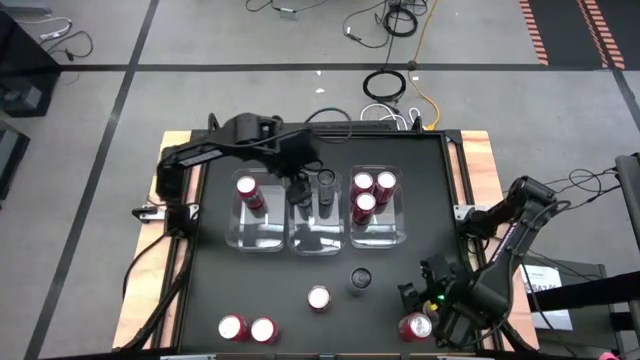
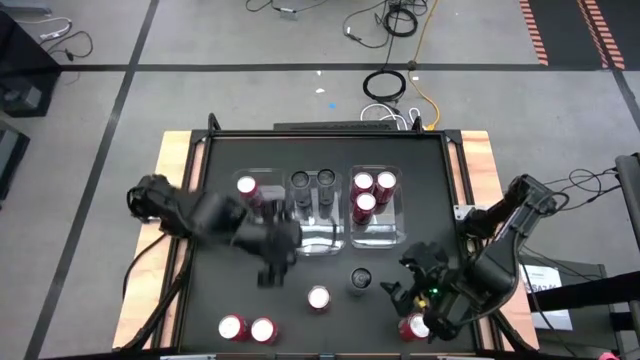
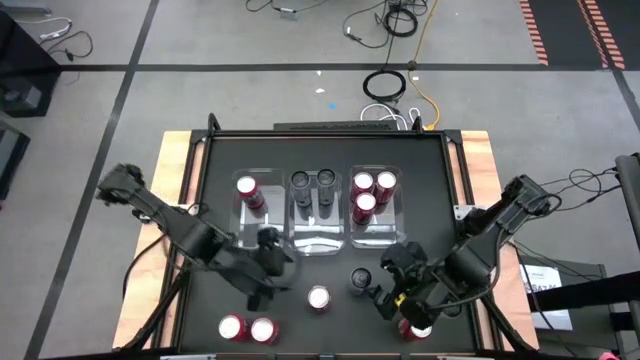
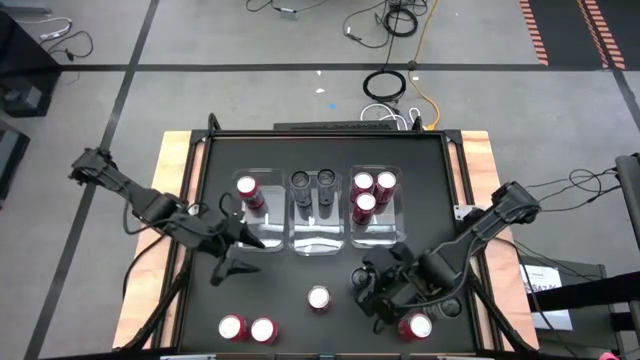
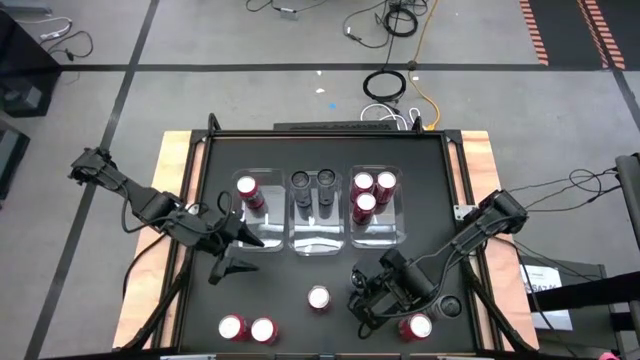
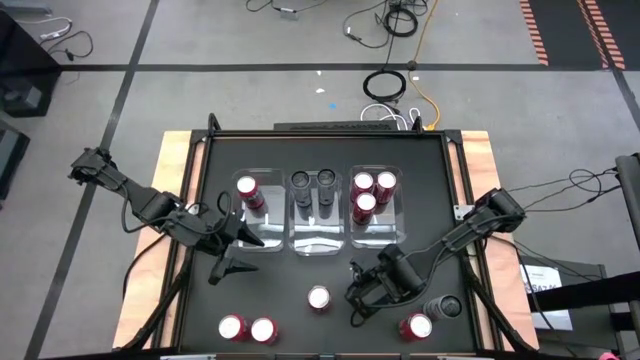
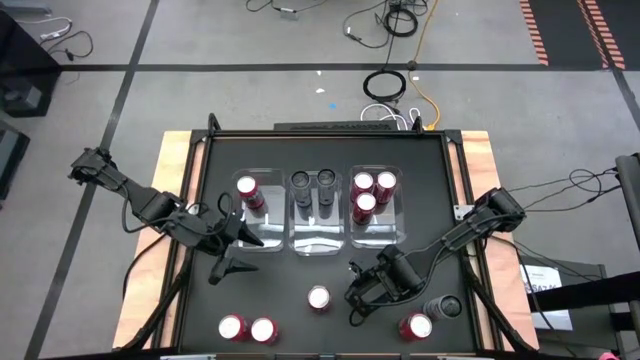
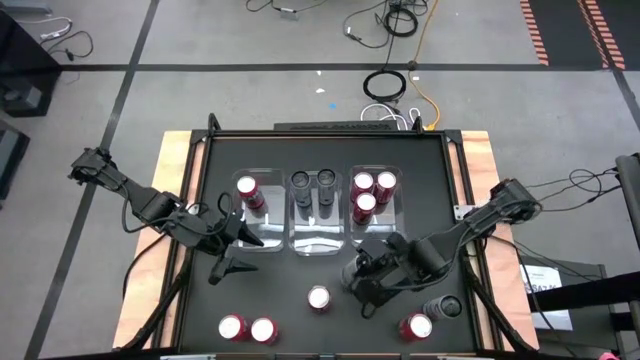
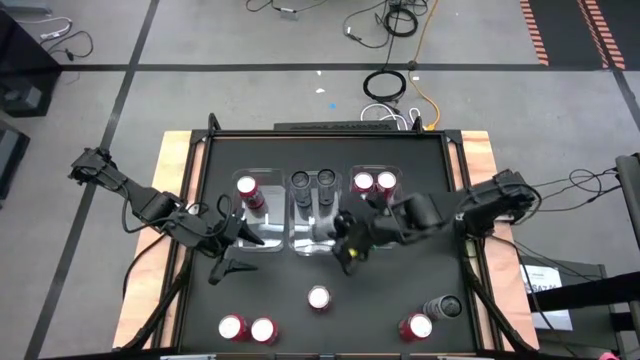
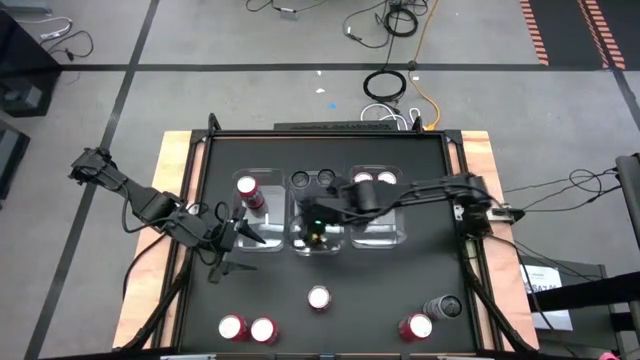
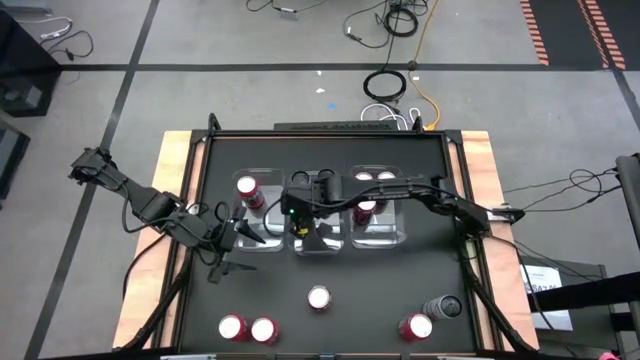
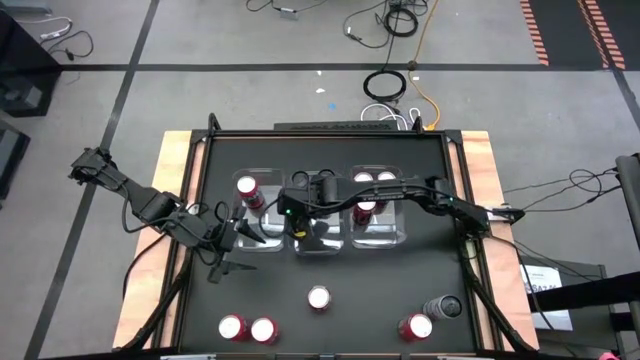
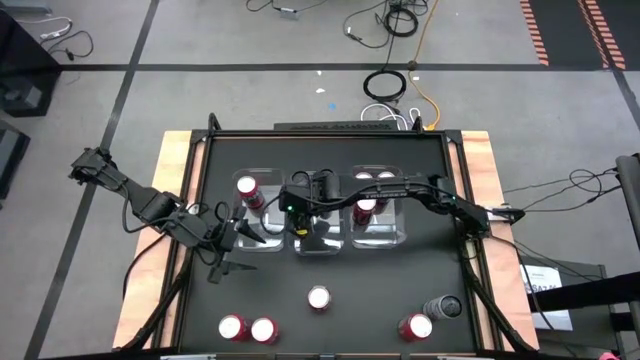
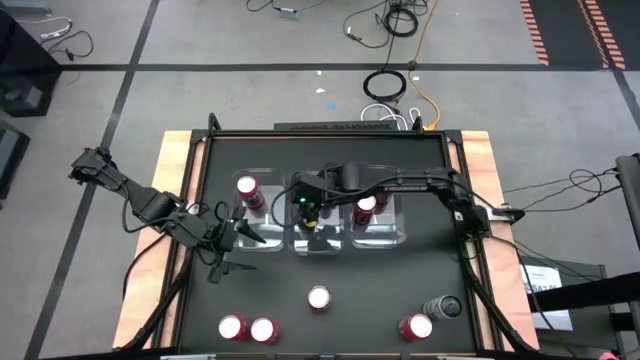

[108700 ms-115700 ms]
Task: Sort soda cans
Put the left white soda can into the middle transparent bin

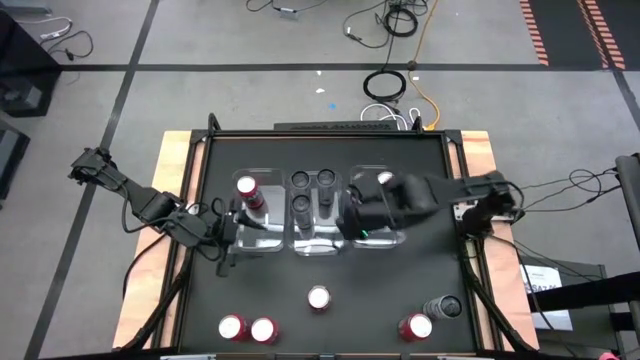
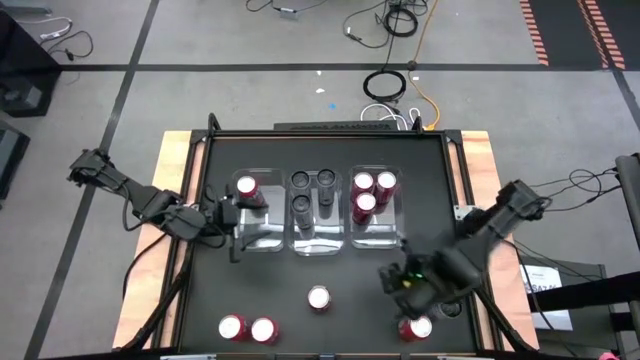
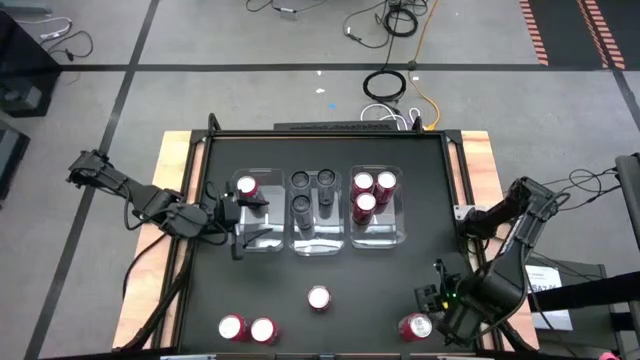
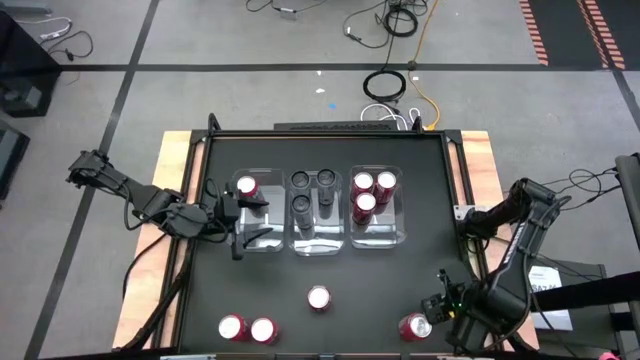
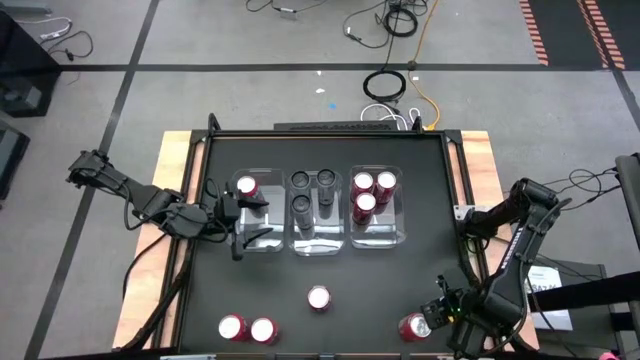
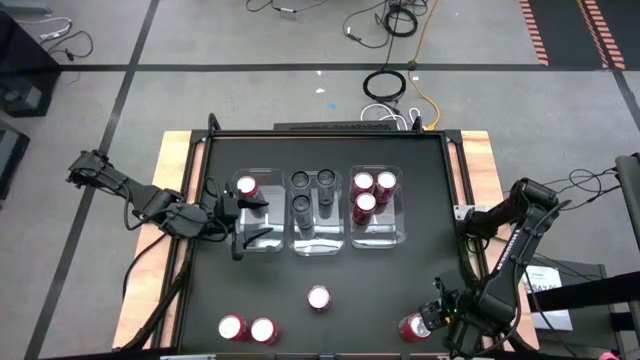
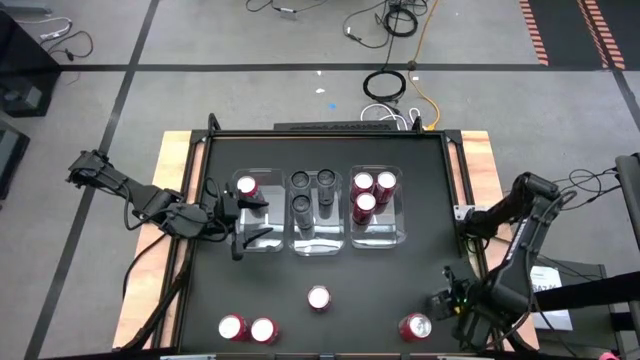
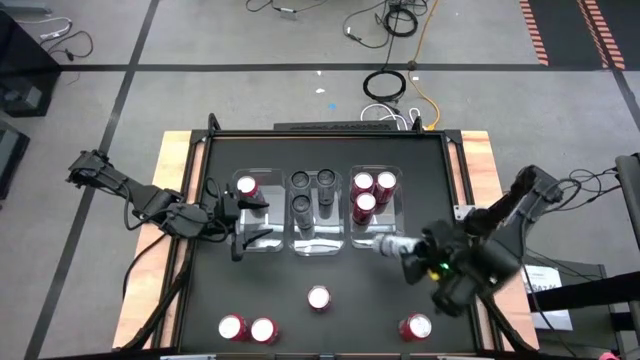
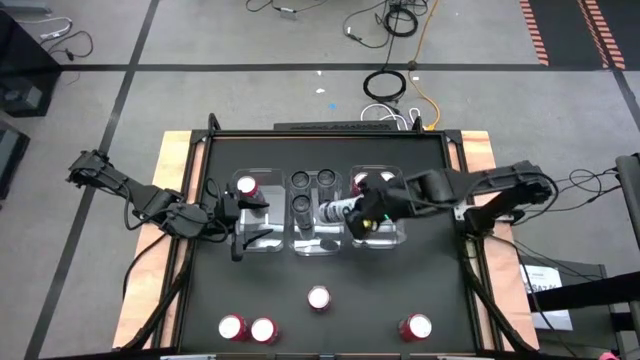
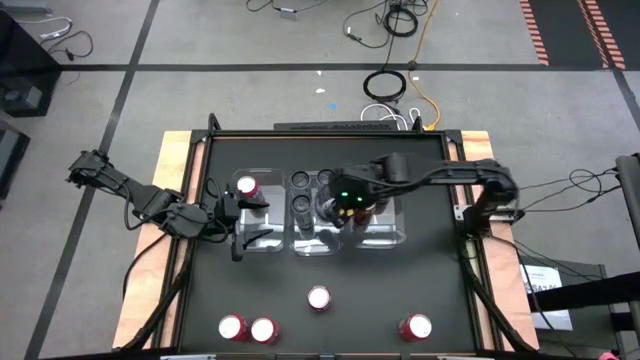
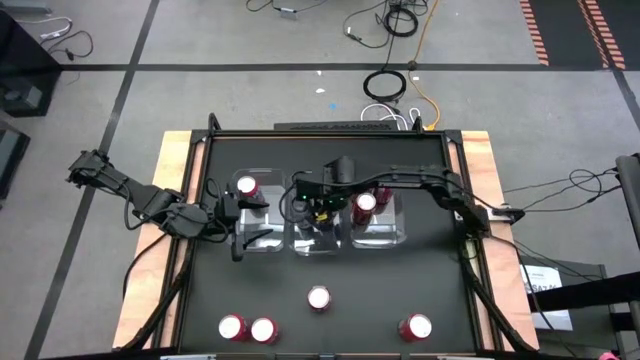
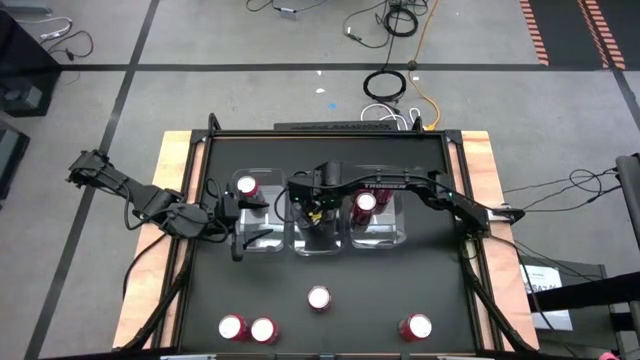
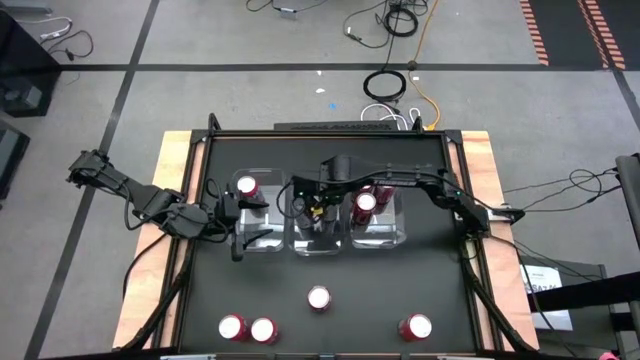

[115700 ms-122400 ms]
Put the white soda can into the middle transparent bin

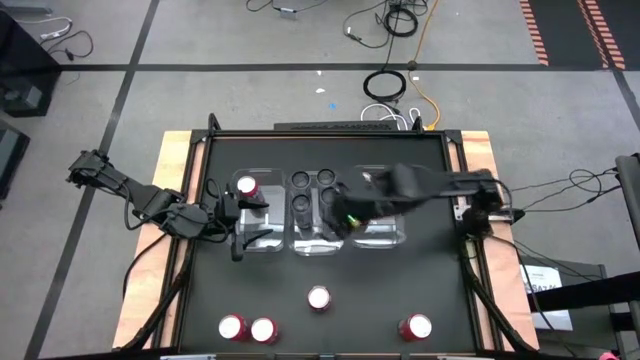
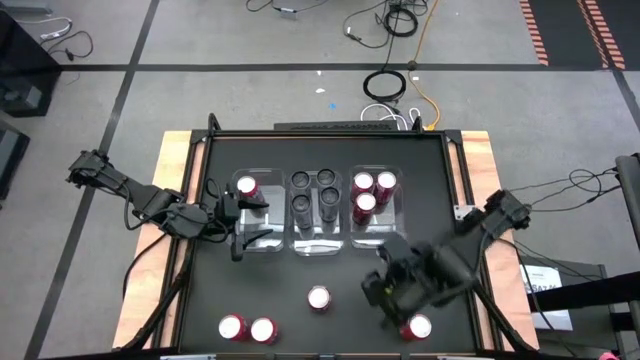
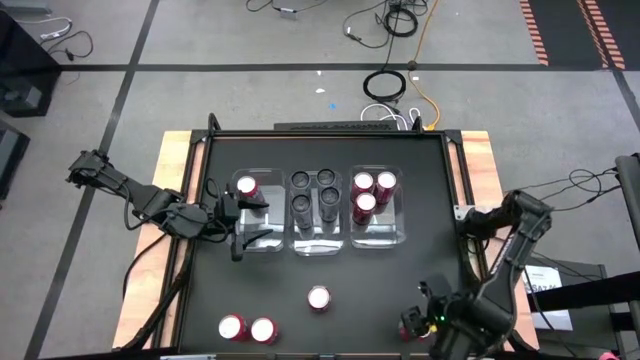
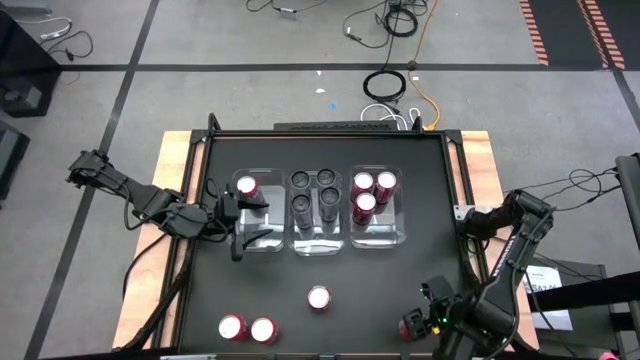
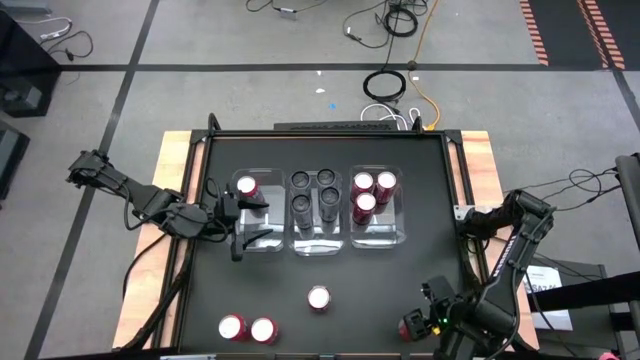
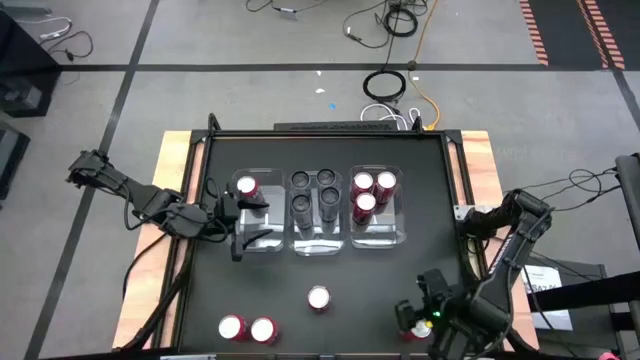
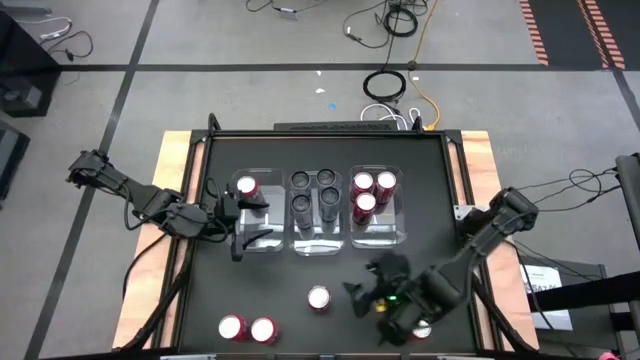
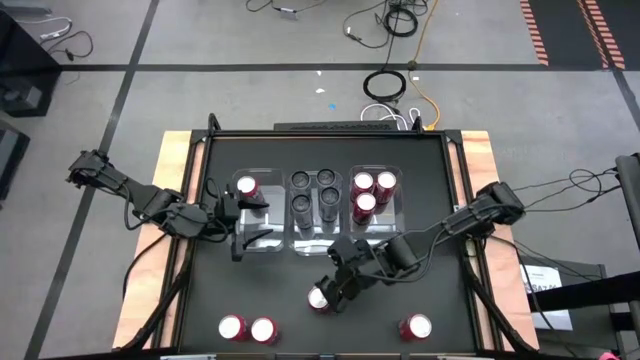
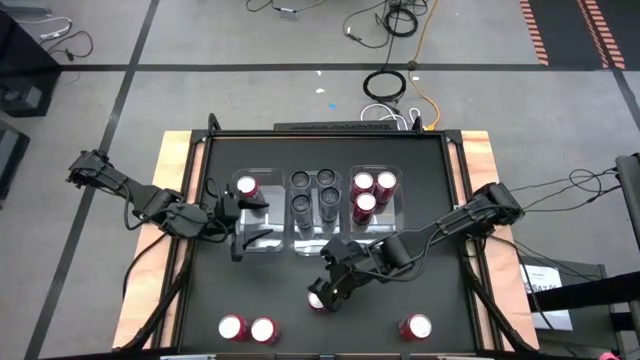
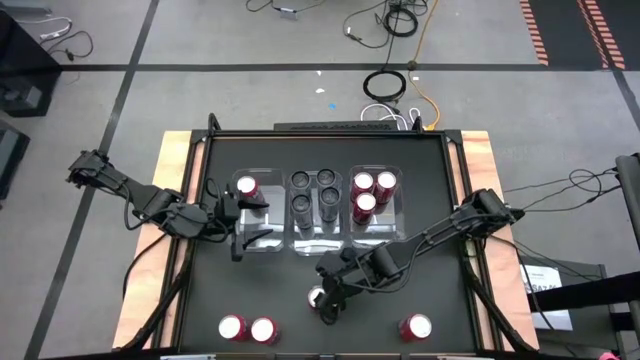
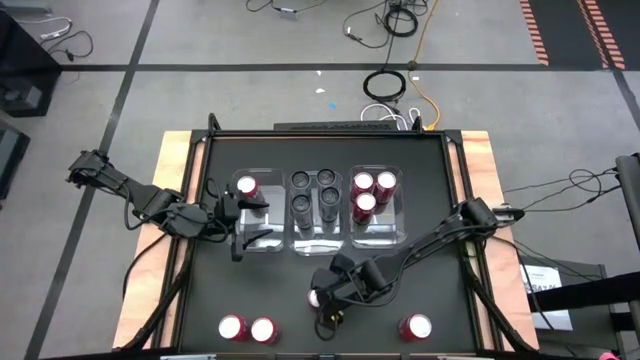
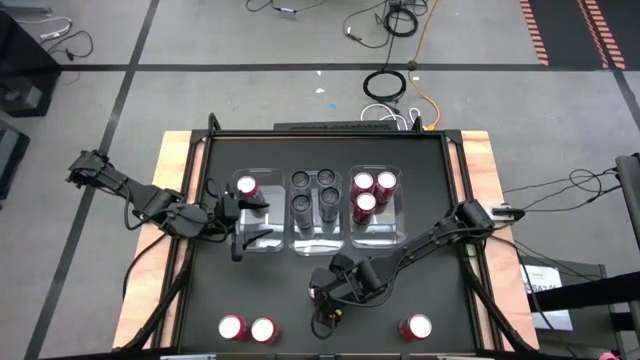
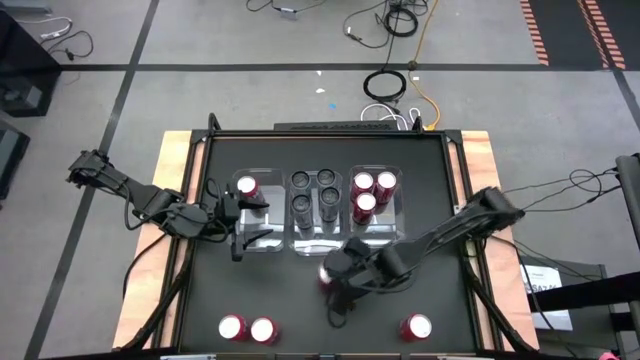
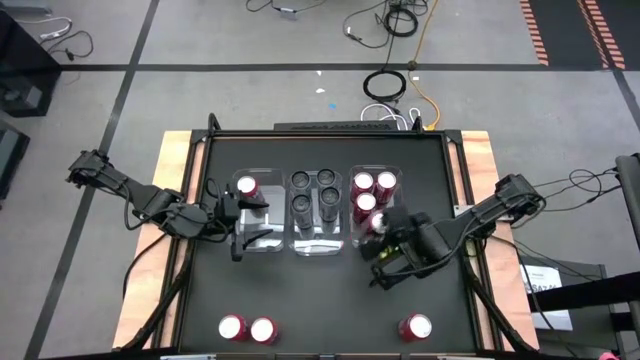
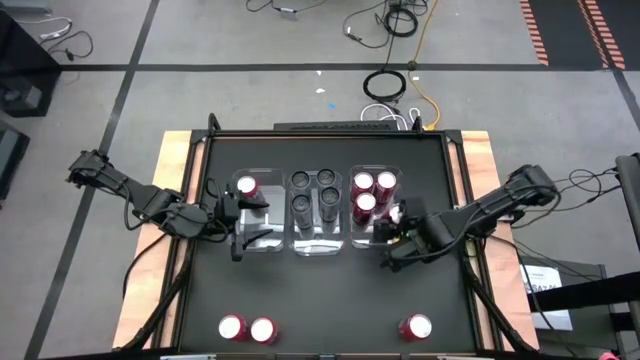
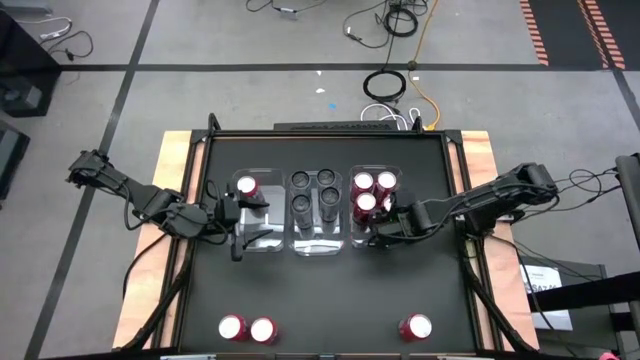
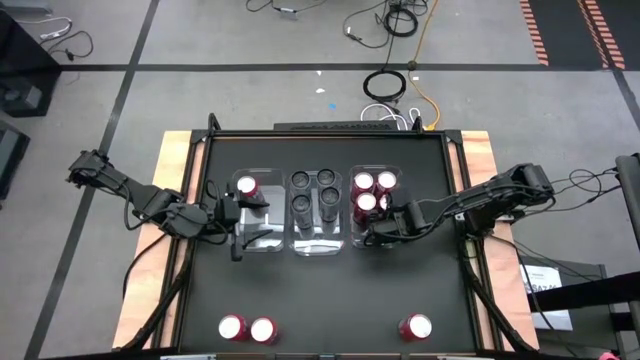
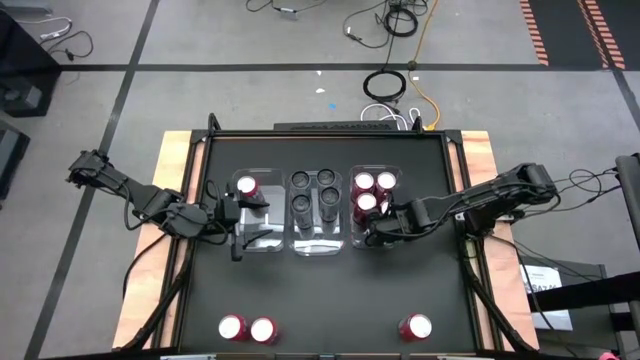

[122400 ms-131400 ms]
Put the red soda can into the right transparent bin
